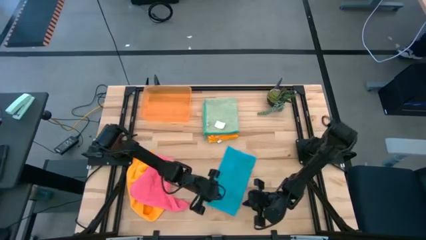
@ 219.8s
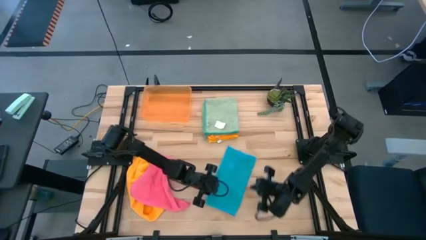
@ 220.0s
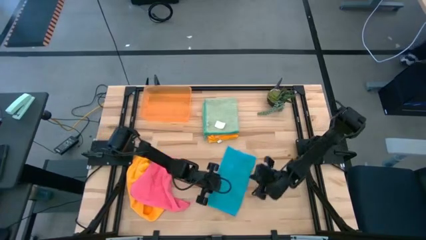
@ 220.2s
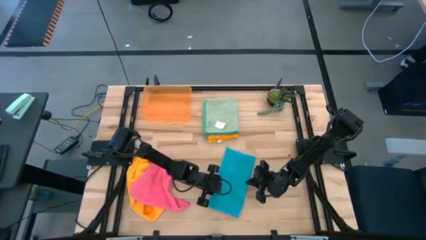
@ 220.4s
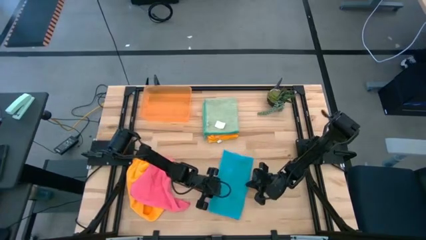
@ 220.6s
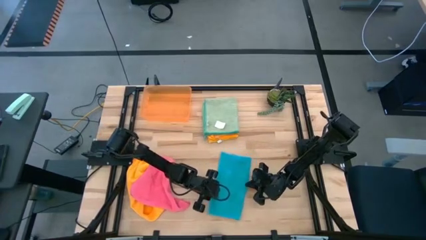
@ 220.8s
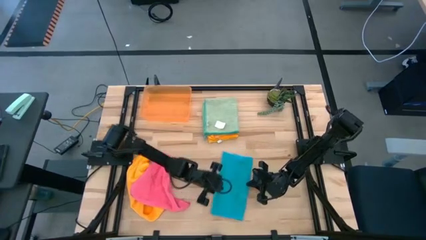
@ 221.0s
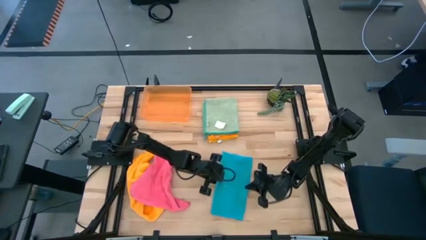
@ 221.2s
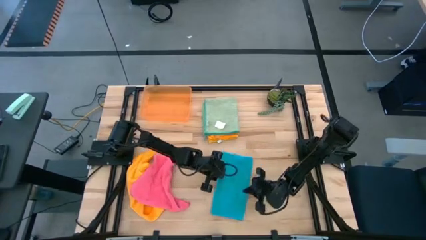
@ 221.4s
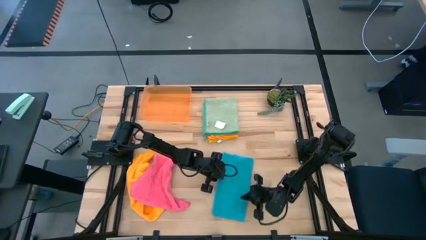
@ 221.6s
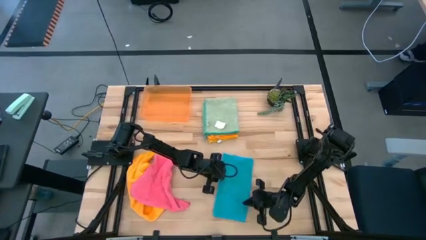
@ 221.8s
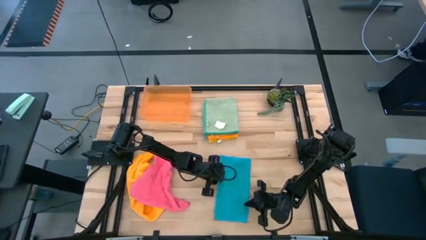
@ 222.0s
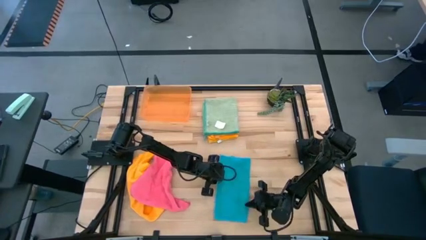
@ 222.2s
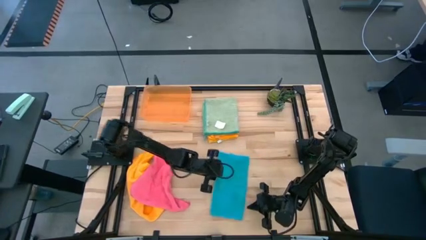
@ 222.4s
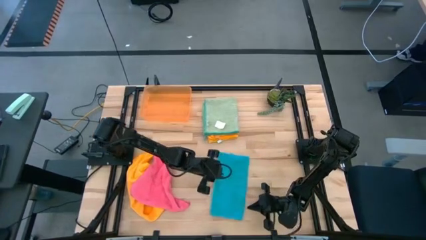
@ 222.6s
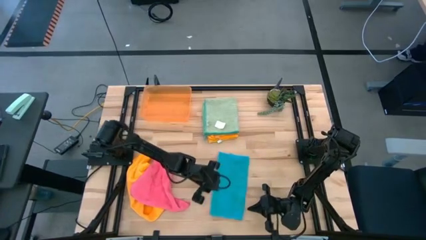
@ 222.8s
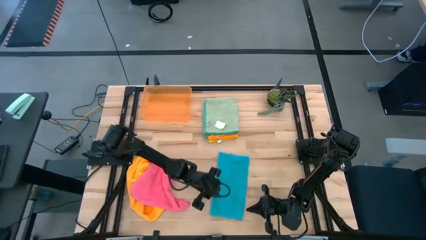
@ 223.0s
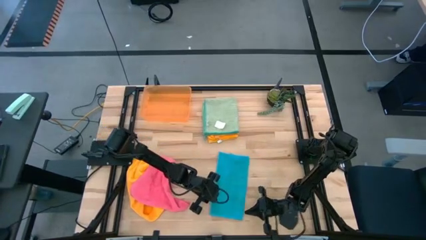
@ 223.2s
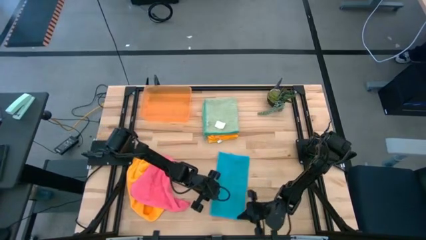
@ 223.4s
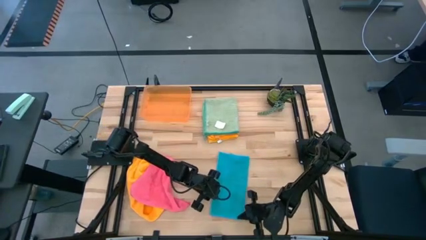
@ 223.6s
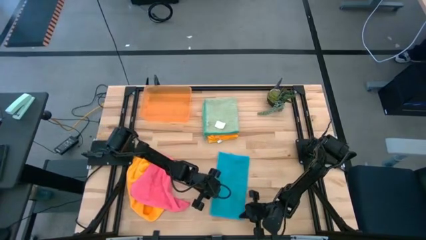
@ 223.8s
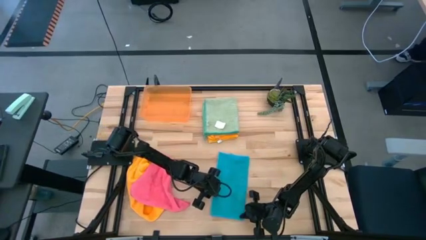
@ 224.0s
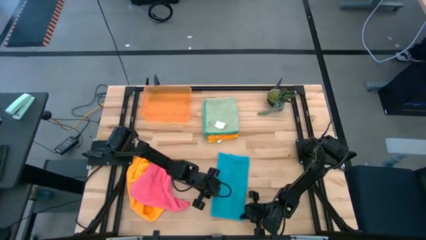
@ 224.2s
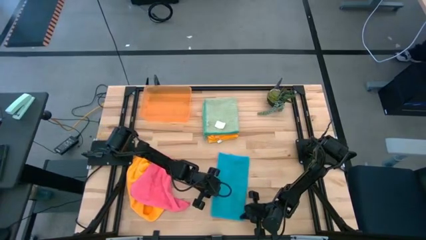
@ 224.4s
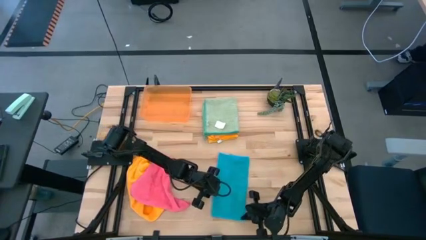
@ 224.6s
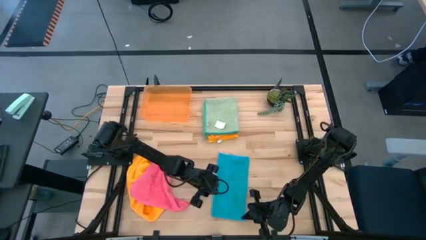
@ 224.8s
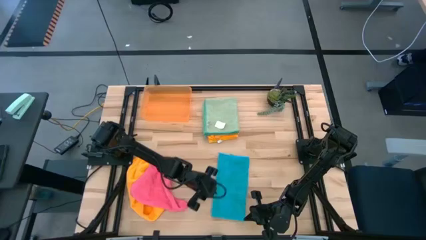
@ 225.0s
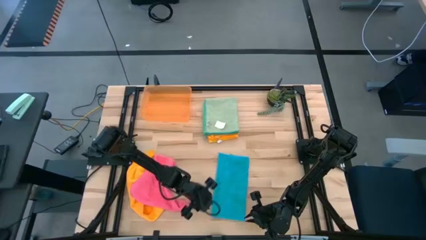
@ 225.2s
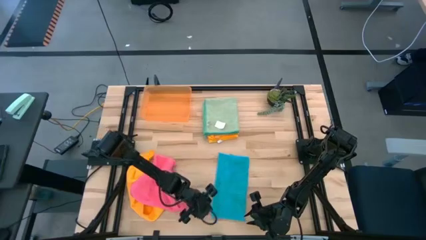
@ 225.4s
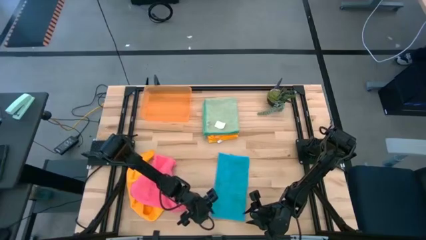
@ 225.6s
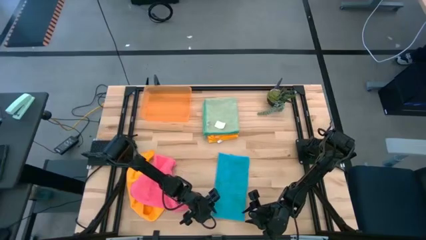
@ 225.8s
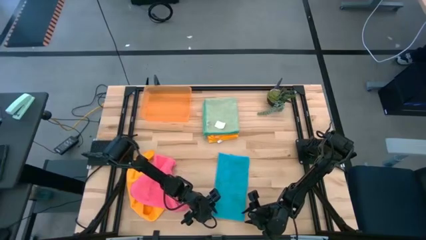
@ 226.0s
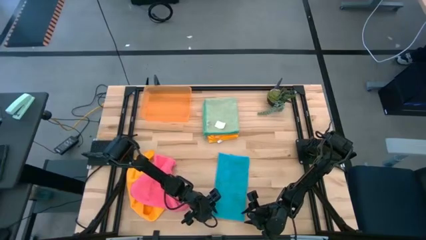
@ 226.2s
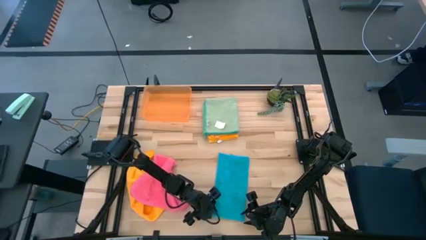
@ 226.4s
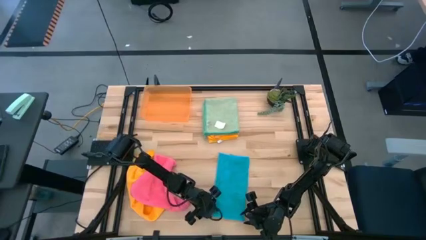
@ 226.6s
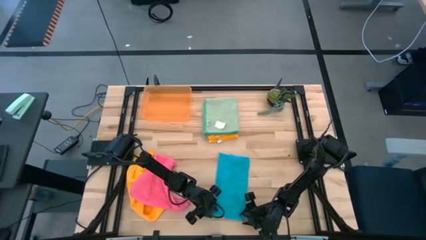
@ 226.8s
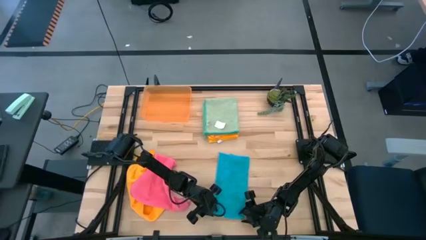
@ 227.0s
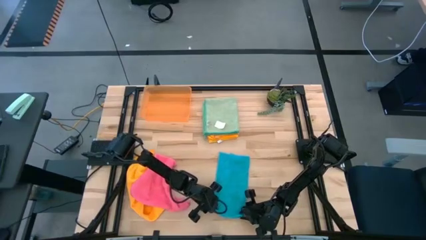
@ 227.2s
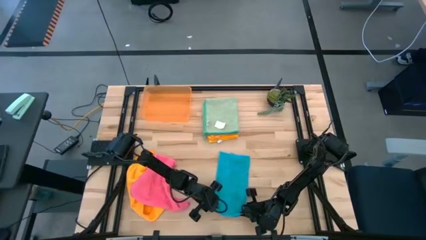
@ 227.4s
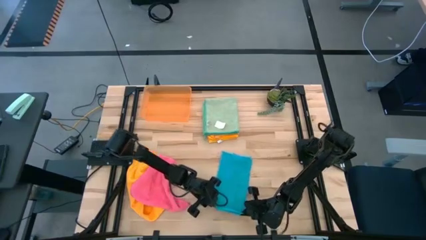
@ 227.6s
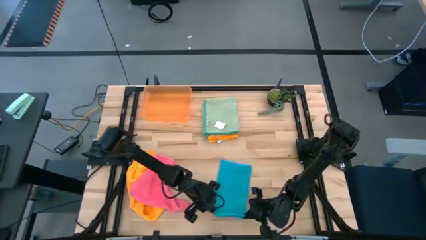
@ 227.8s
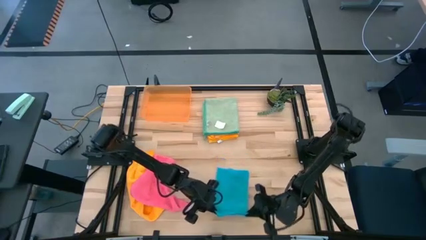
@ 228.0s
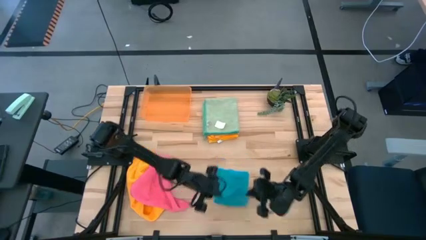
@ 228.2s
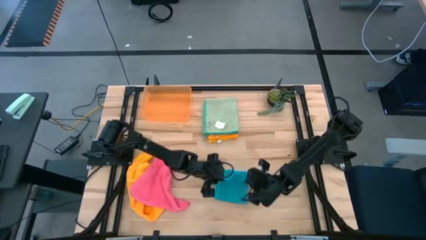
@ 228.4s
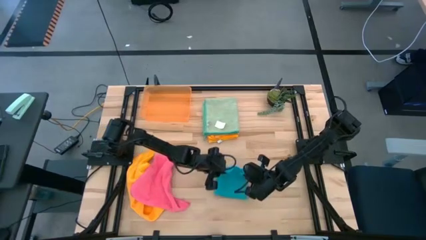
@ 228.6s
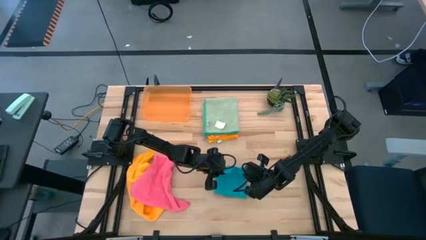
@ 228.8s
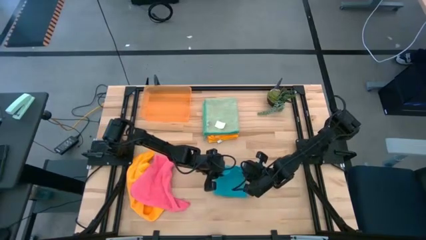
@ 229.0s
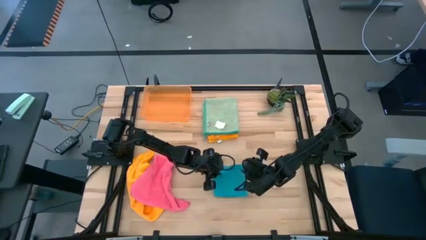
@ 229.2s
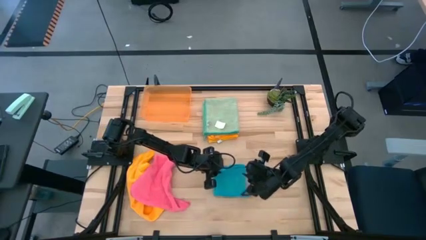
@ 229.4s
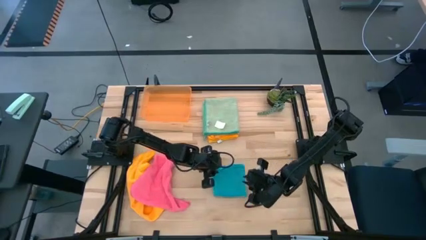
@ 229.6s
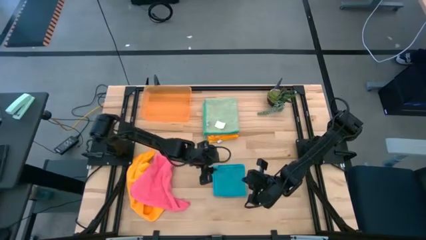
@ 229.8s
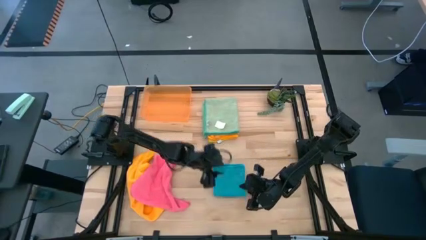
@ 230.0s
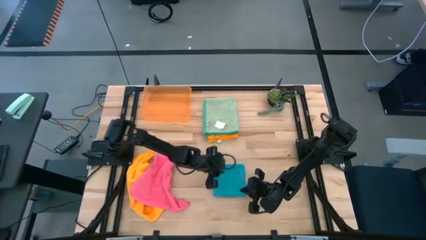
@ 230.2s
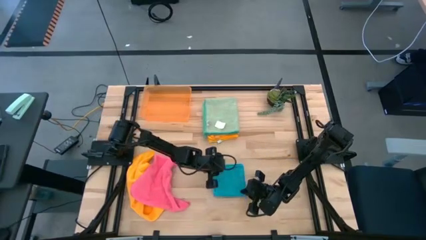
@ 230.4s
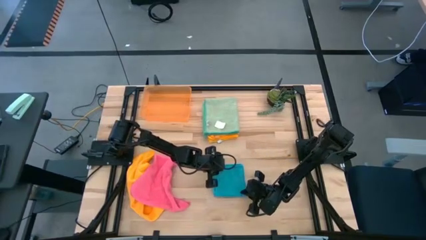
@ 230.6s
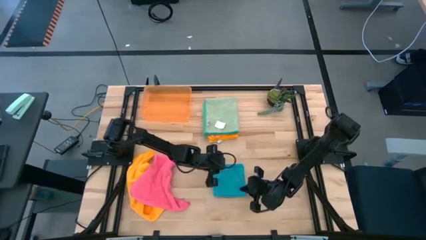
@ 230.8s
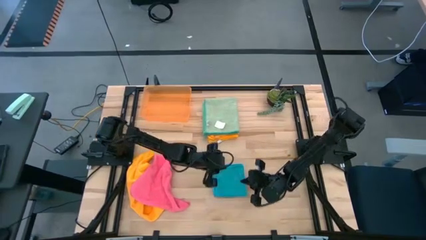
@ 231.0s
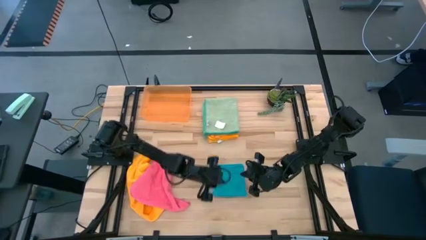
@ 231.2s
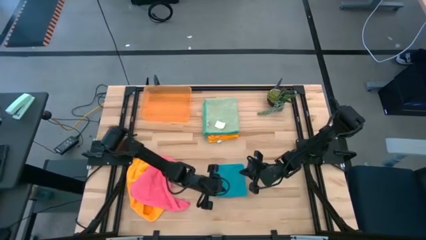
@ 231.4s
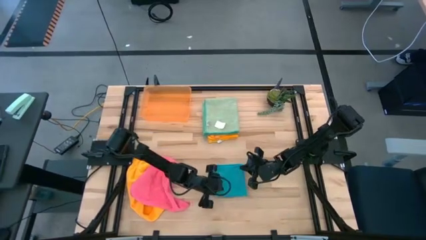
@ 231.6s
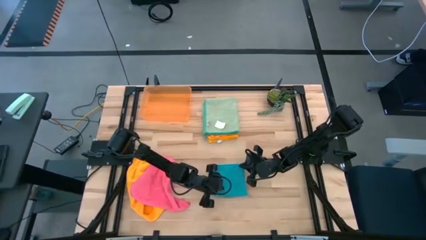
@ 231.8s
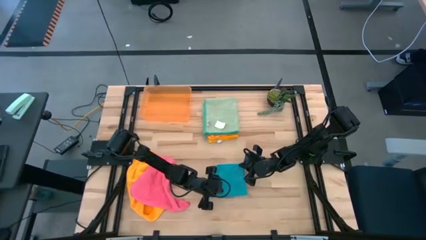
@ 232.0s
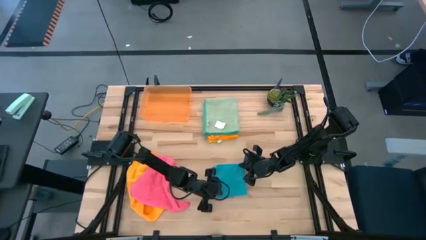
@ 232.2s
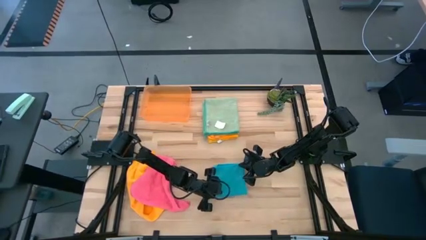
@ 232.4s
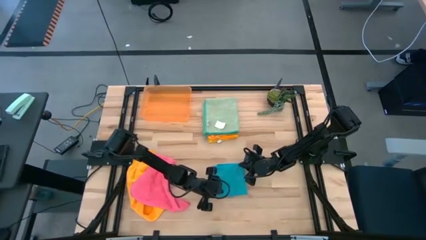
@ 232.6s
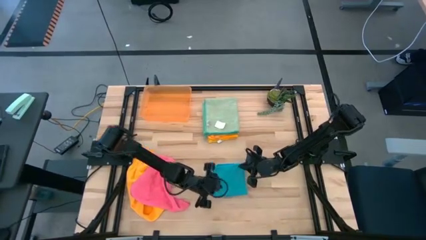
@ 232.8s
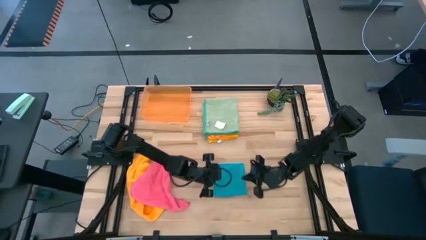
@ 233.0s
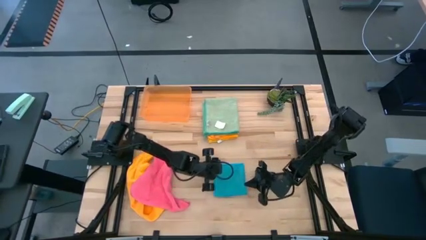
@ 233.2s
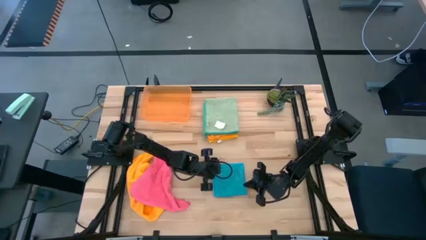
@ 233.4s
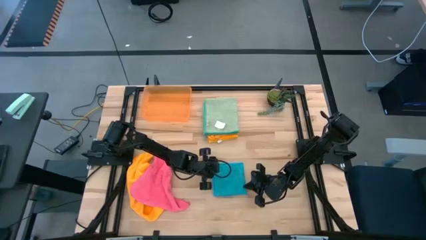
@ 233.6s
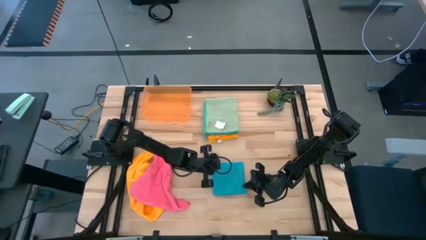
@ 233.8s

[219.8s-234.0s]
Task: Fold microfiber towels
Fold the blue towel

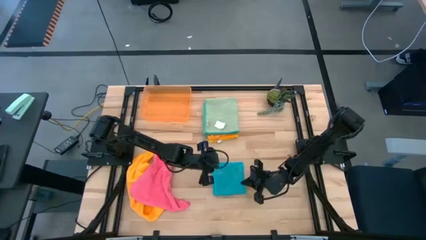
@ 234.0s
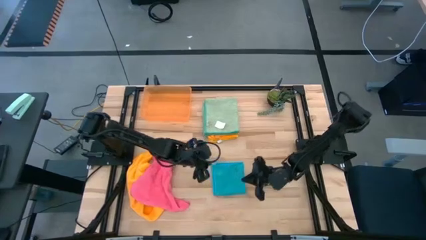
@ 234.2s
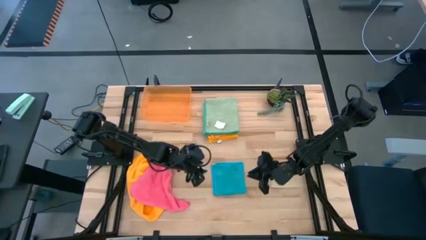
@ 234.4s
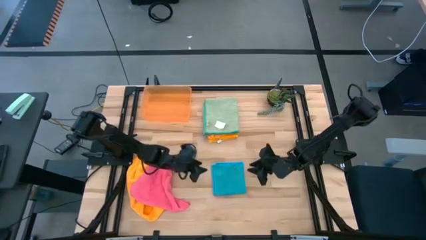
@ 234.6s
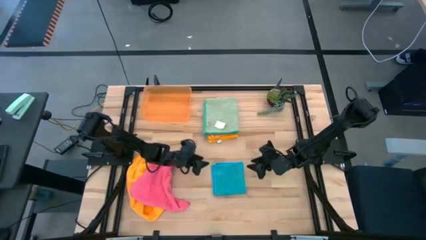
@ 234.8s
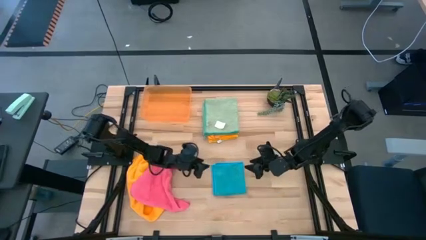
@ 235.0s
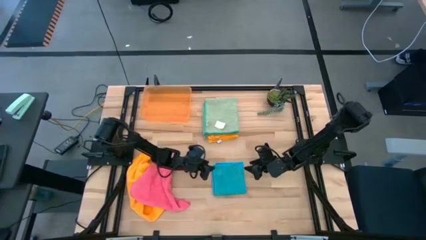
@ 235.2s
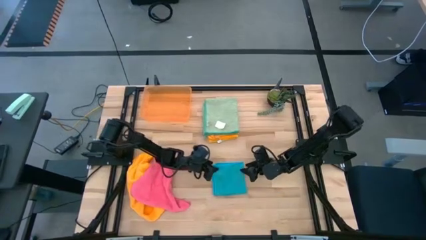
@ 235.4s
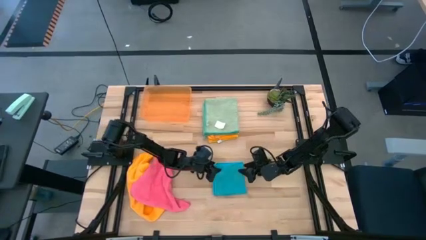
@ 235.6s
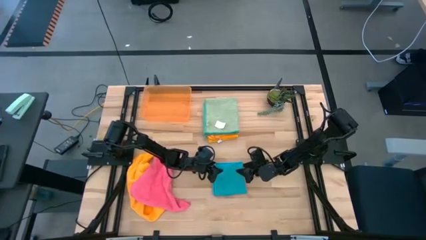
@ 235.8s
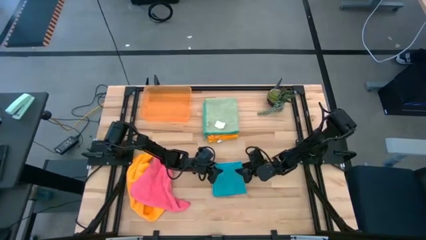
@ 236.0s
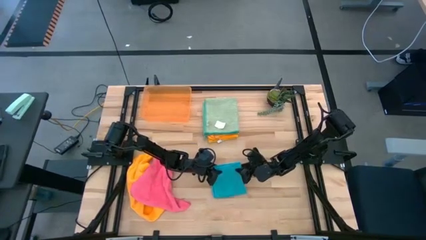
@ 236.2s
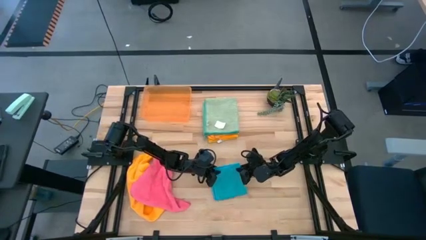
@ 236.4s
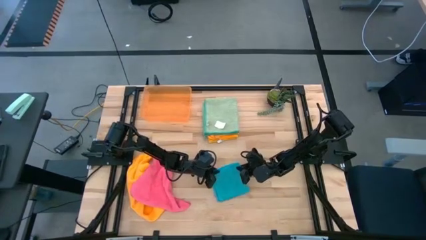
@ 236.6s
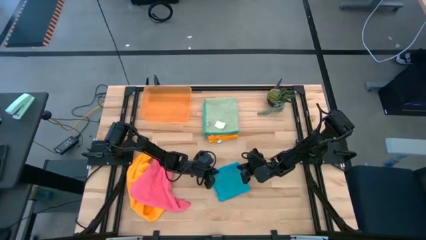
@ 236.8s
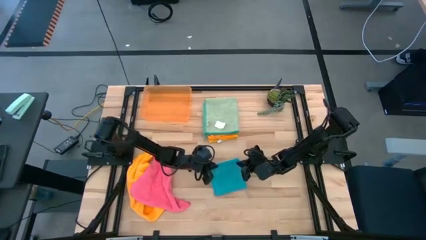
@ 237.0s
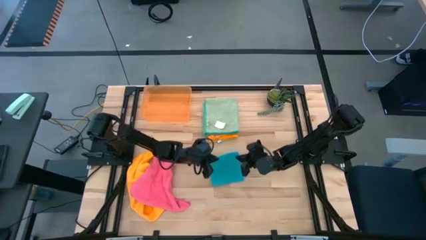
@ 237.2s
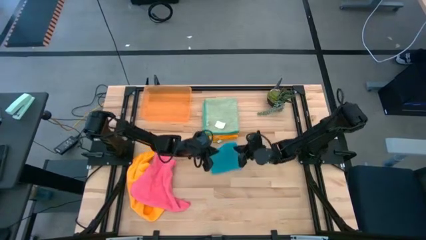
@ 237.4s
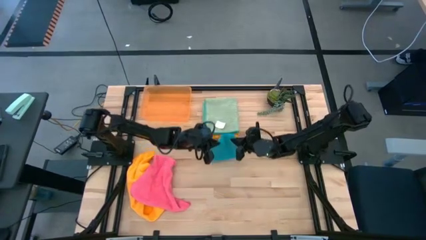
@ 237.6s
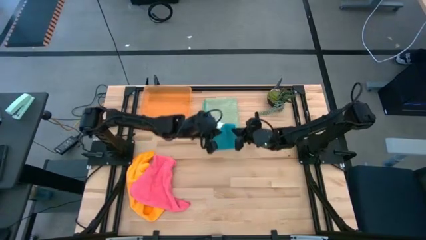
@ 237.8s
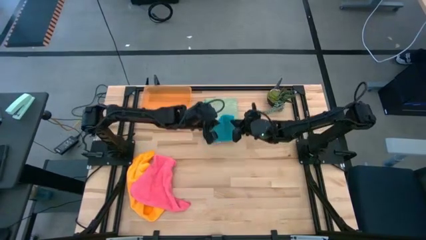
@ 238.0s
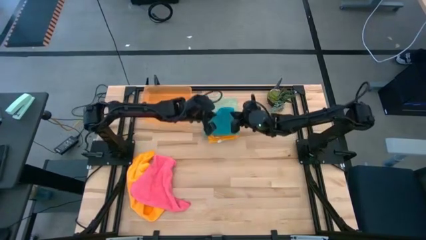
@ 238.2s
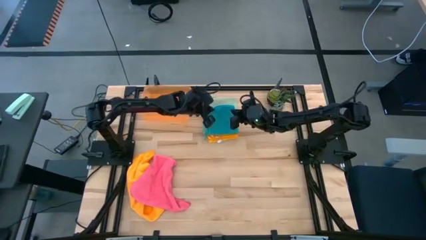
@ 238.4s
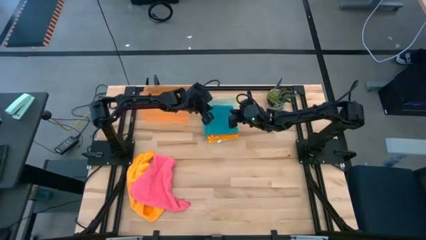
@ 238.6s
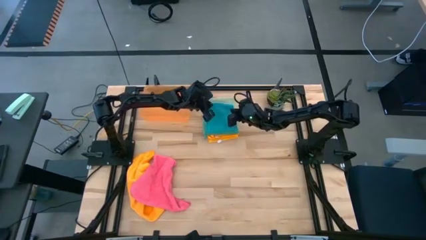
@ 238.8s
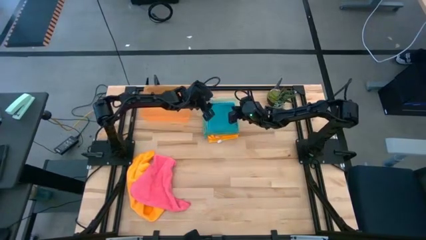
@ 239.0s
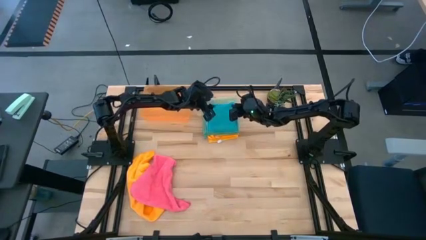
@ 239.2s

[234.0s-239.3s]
Stack the folded blue towel on the folded light green towel
